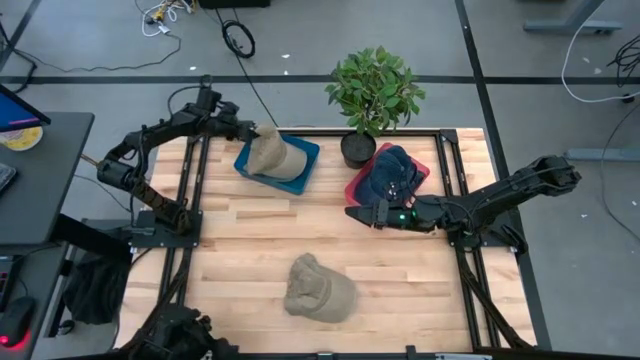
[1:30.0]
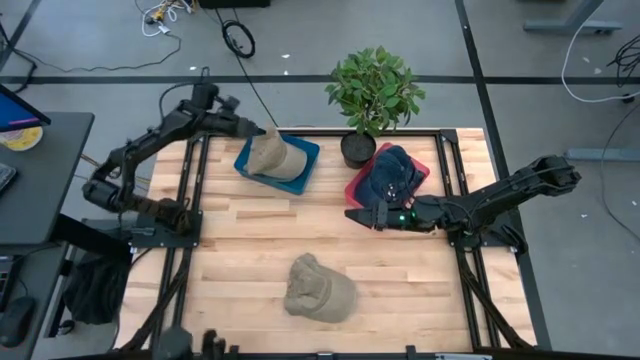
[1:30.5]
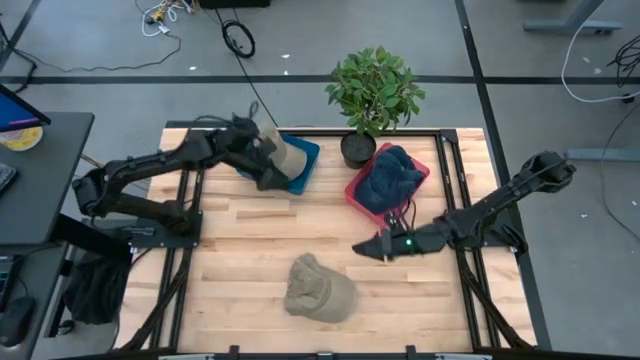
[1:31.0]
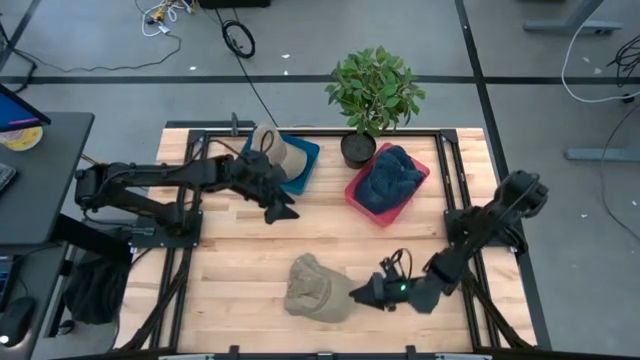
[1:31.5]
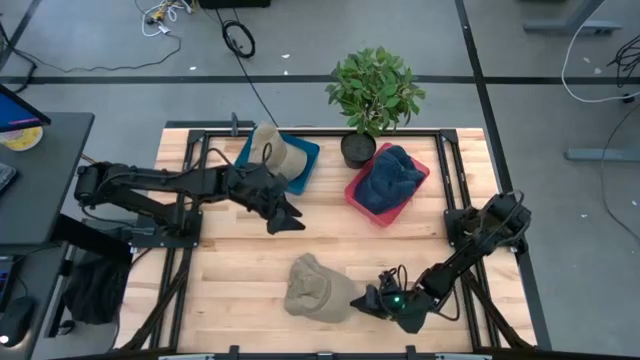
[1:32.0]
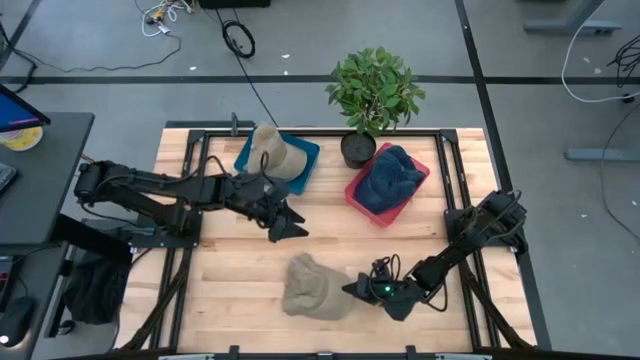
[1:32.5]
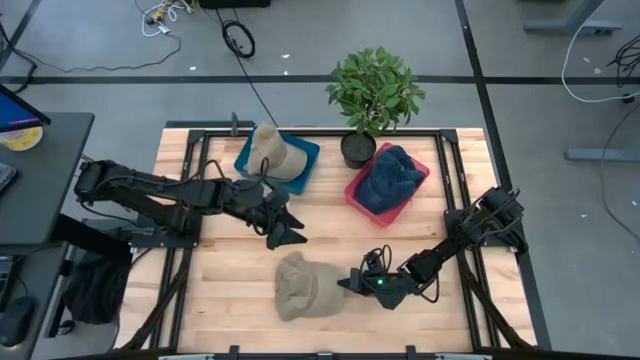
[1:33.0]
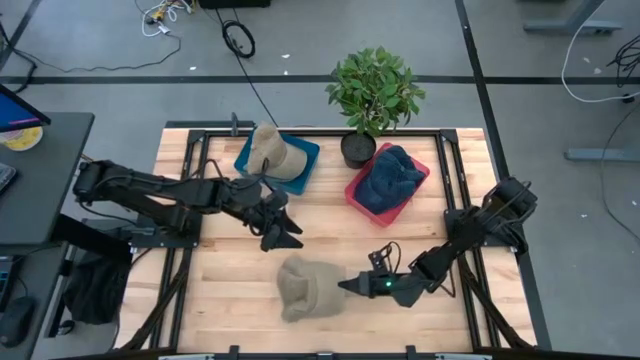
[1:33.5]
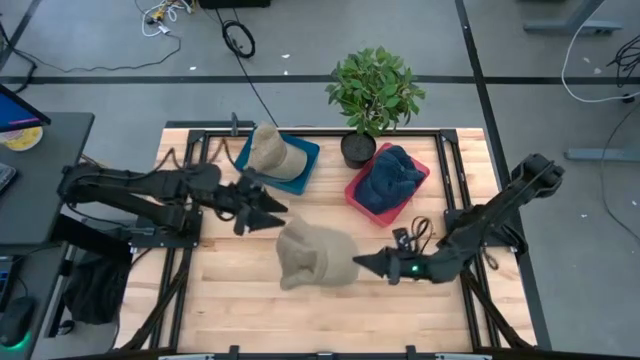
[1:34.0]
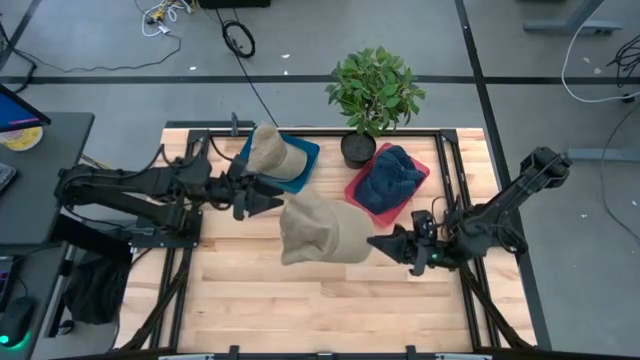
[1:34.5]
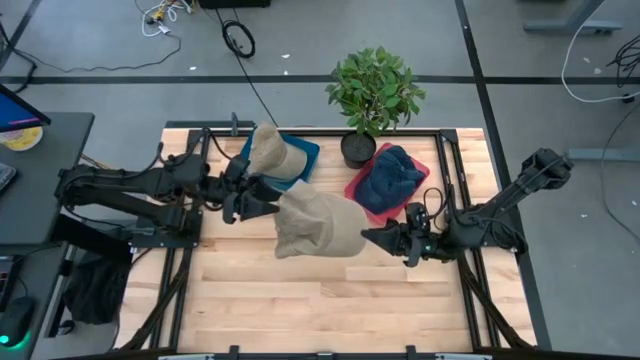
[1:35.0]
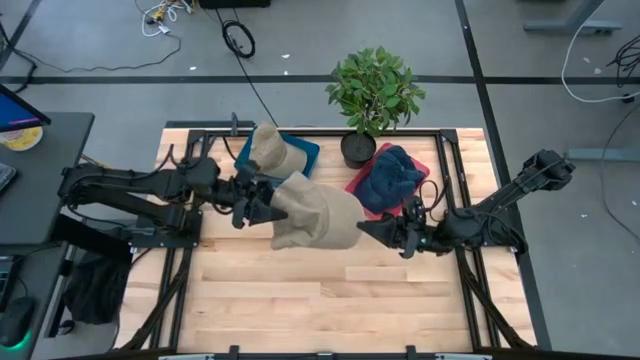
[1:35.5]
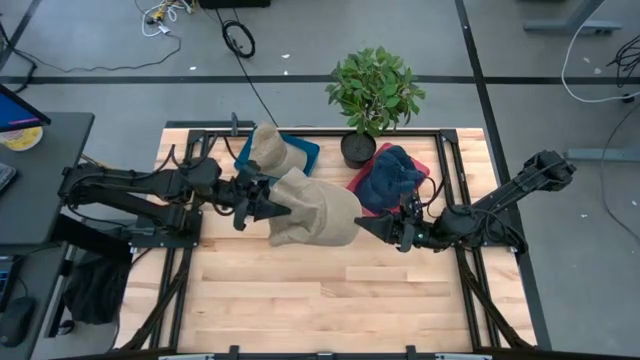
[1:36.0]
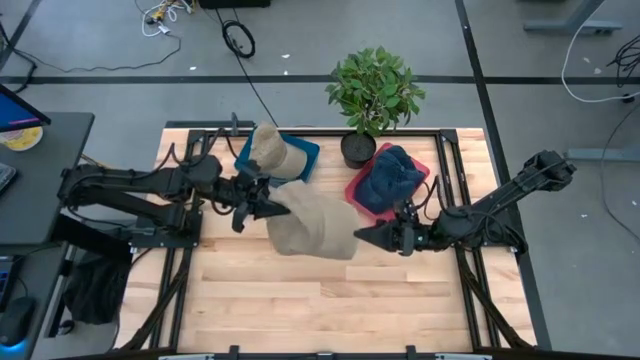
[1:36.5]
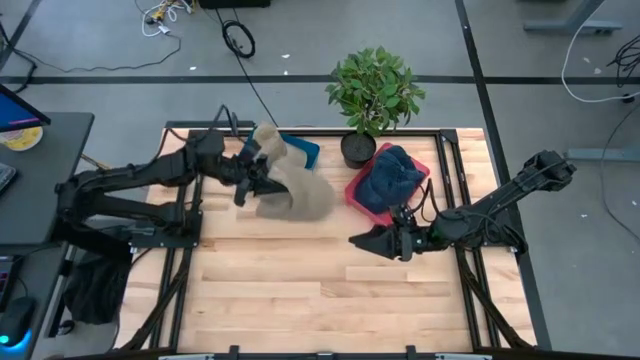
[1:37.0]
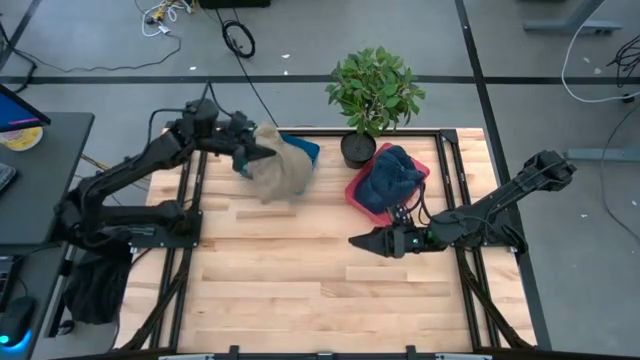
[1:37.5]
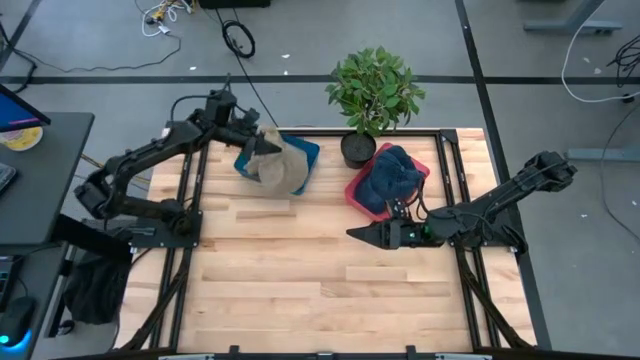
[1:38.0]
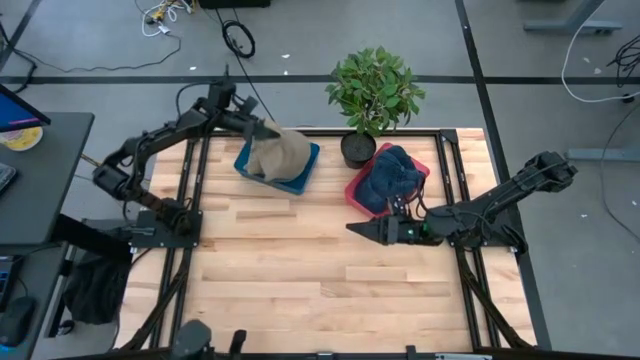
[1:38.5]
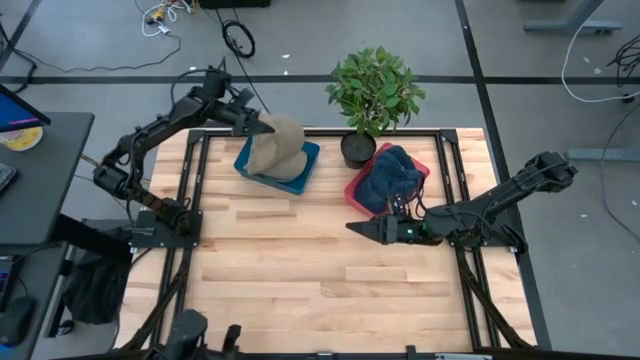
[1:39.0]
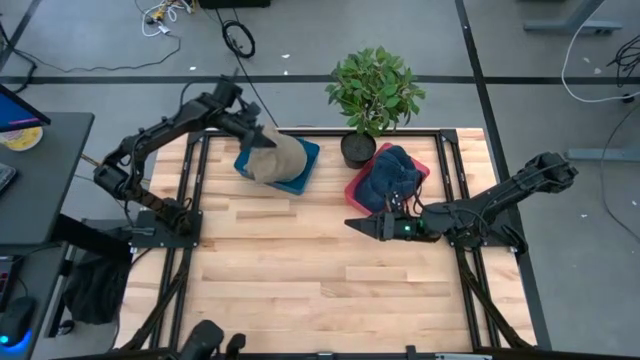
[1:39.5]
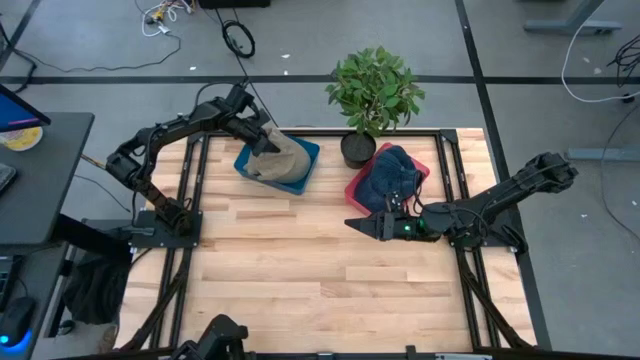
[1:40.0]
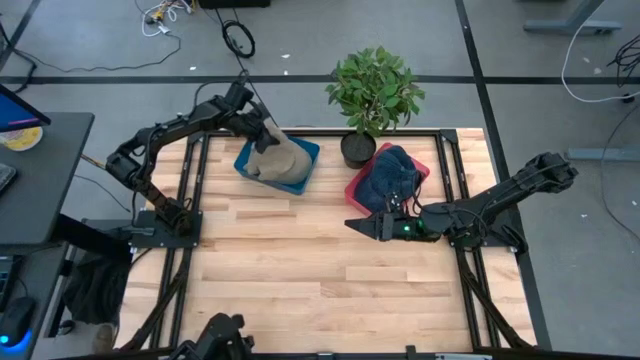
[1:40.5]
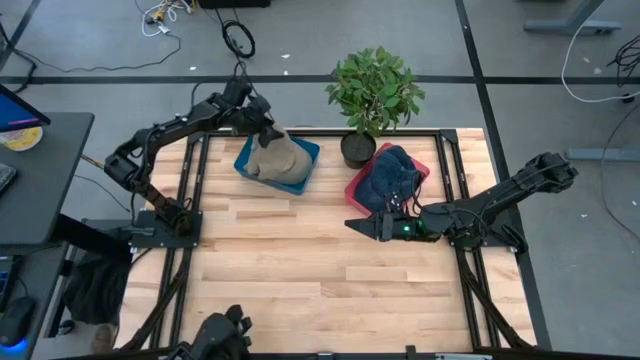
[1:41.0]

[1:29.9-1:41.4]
Task: Pick & Place hat
Put the brown cap into the blue bin

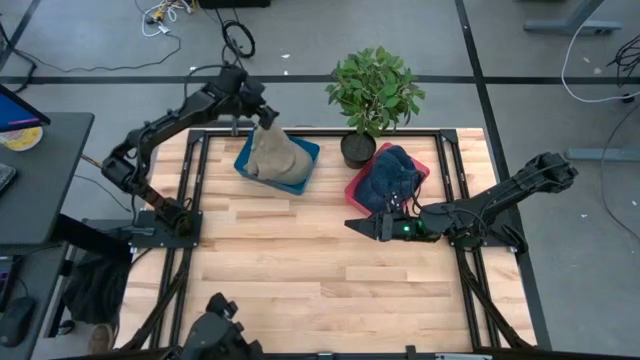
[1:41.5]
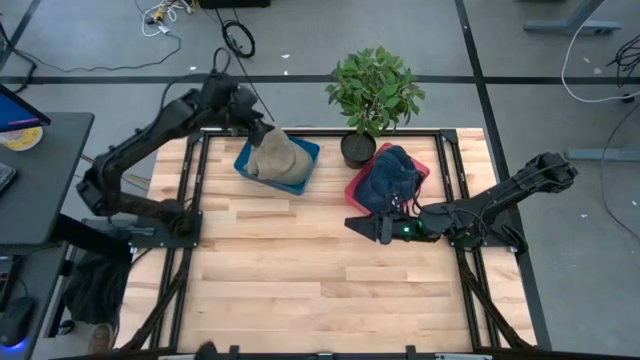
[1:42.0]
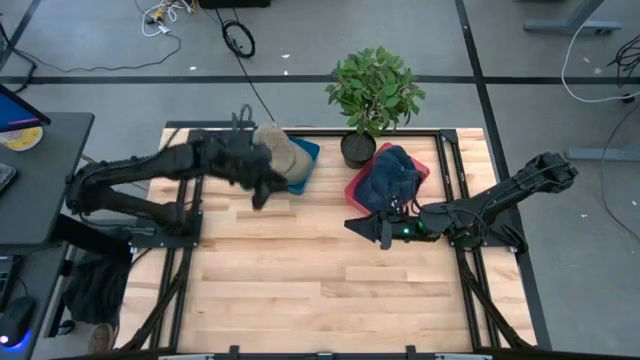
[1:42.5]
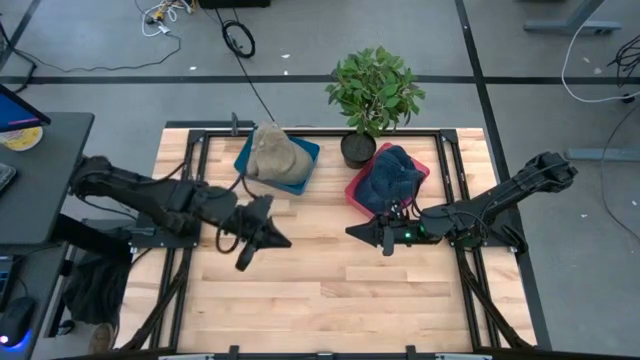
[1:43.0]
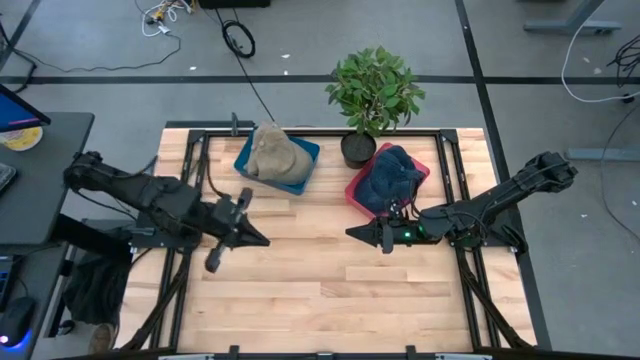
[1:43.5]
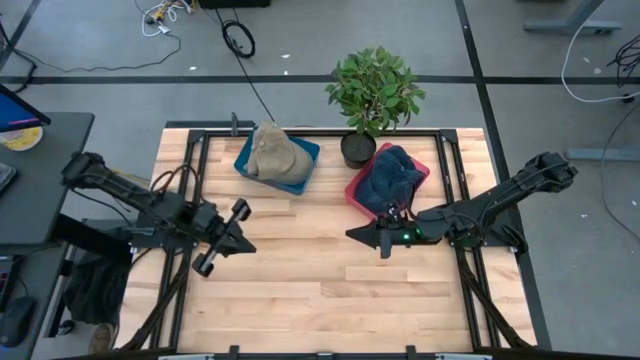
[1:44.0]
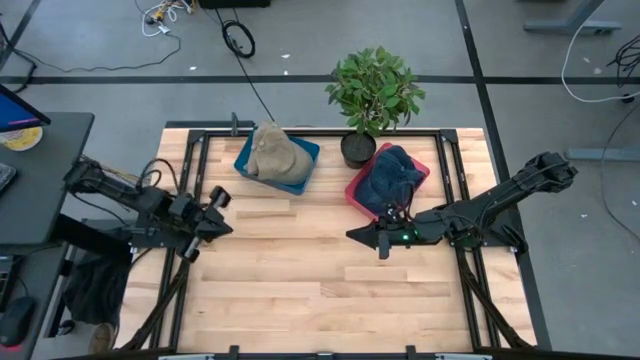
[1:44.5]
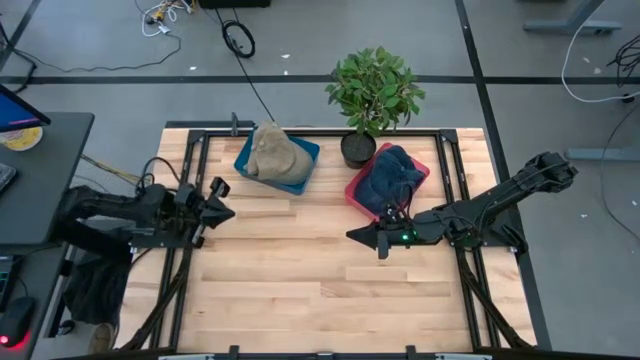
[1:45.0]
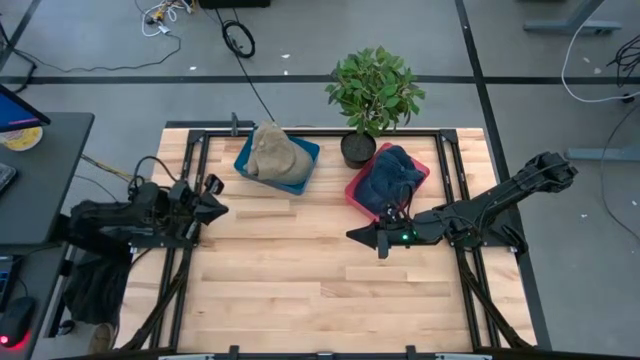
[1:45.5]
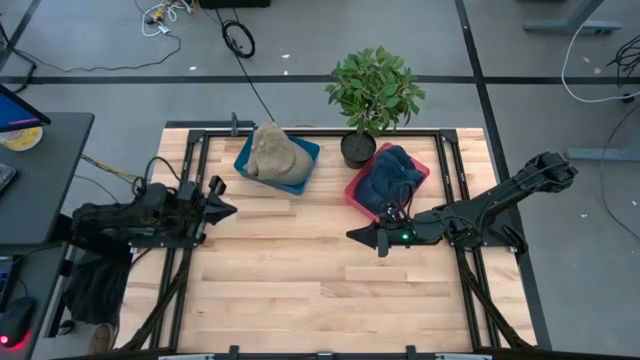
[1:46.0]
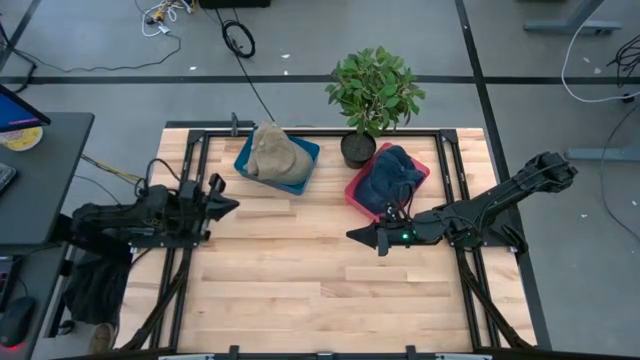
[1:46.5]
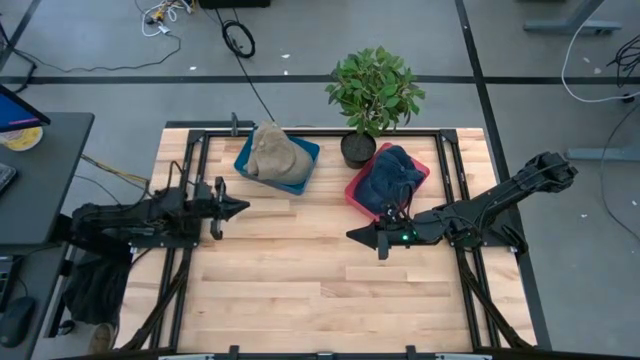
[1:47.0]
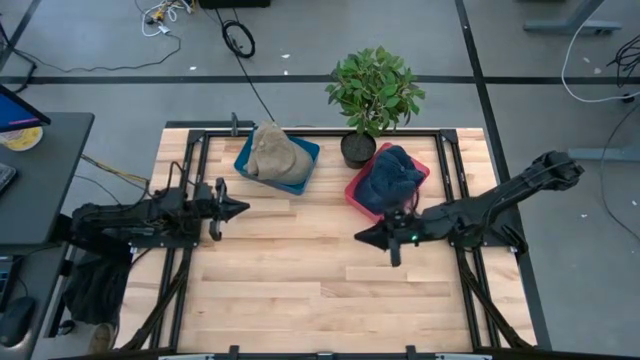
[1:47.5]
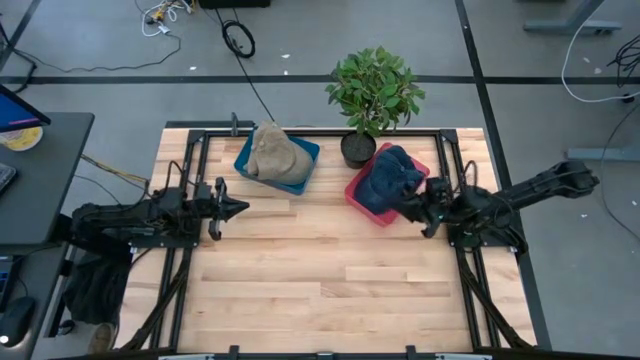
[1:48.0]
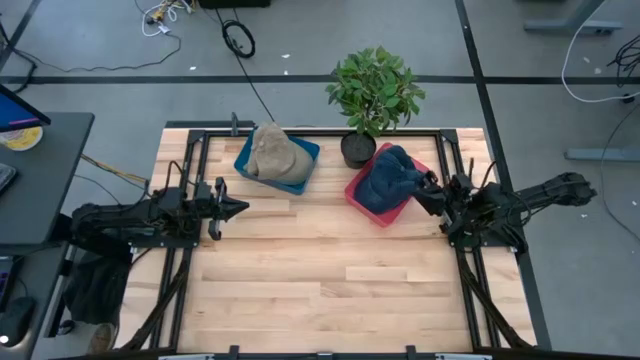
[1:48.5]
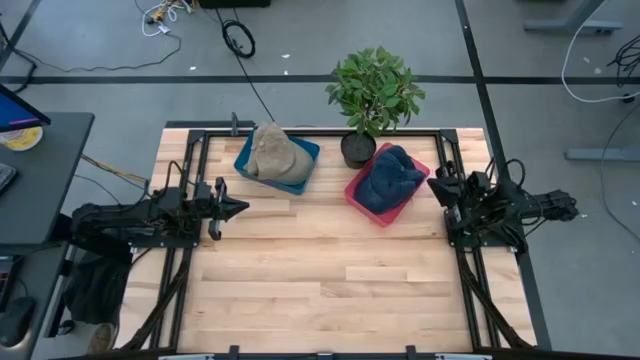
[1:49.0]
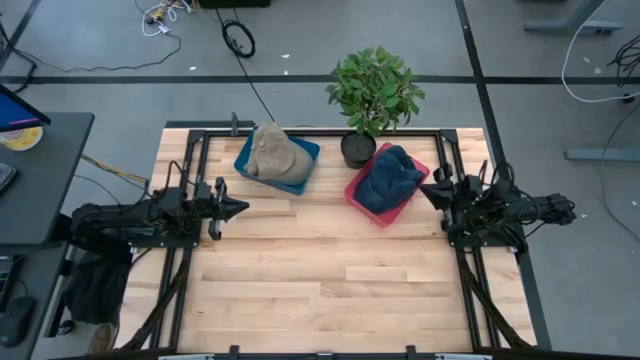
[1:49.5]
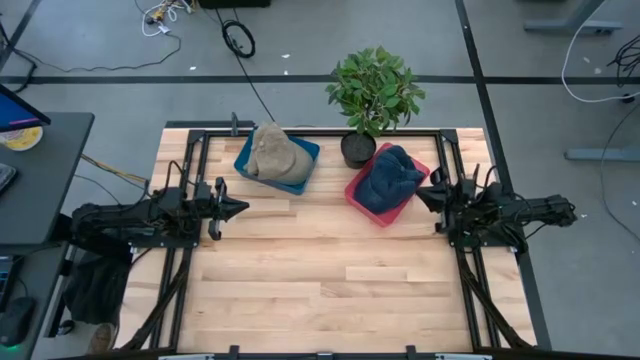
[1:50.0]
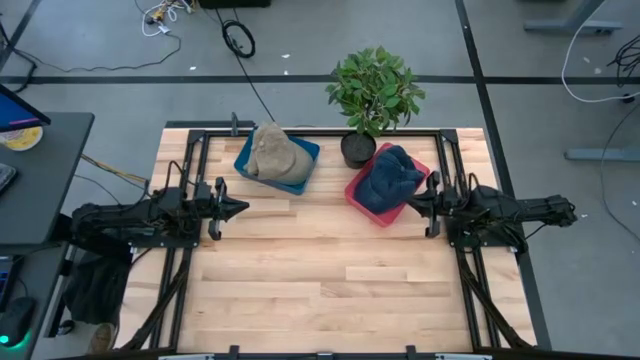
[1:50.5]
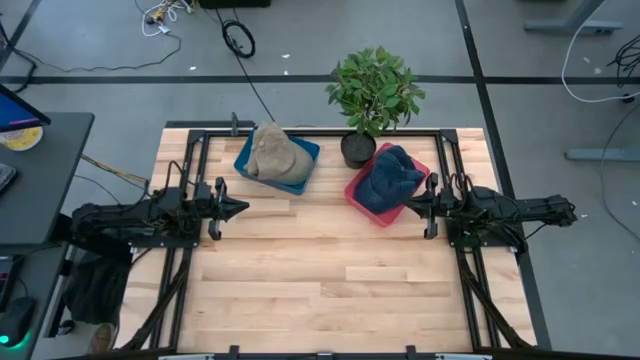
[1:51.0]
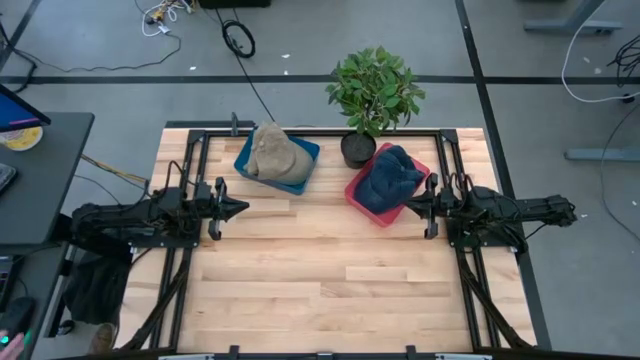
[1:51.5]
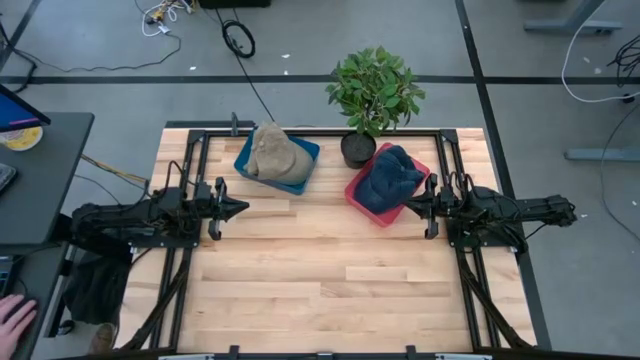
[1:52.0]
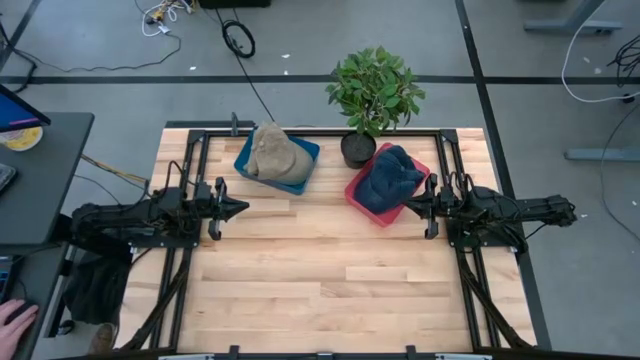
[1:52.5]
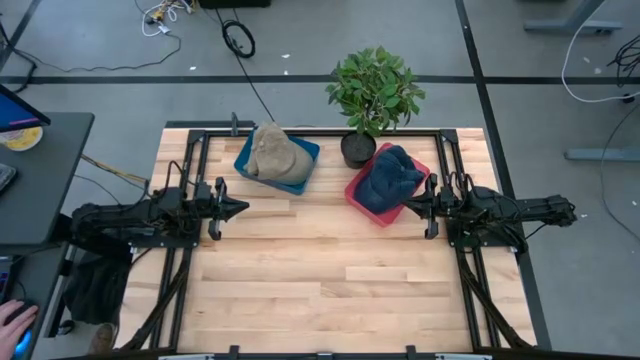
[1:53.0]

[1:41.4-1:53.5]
Return to Home Position
